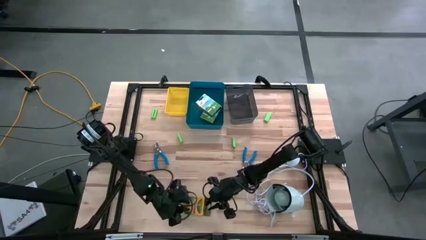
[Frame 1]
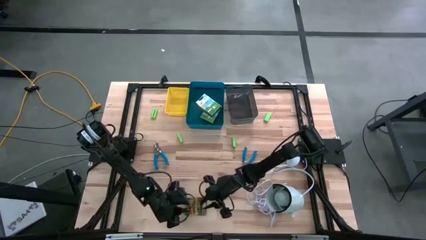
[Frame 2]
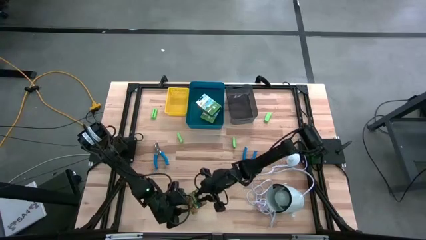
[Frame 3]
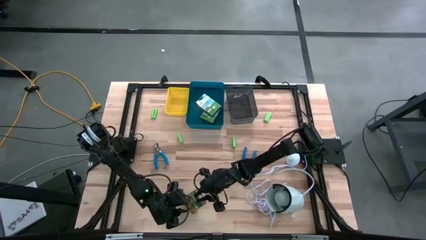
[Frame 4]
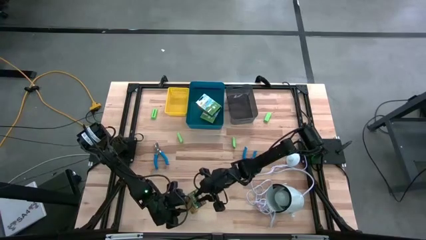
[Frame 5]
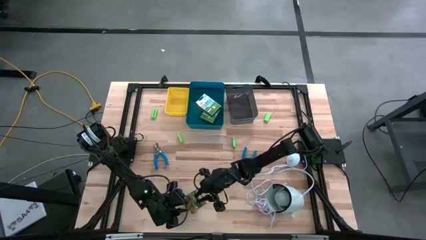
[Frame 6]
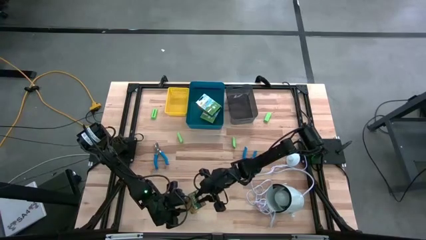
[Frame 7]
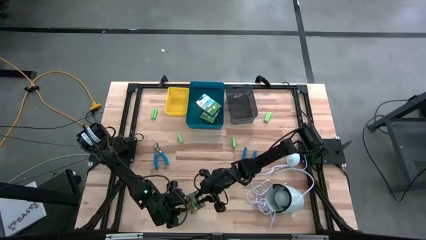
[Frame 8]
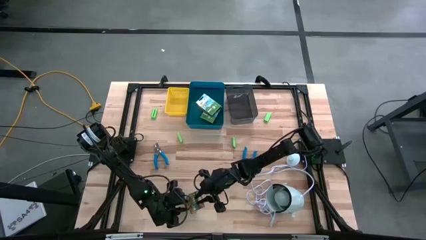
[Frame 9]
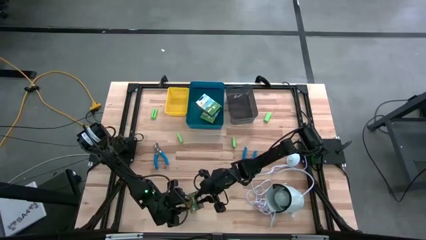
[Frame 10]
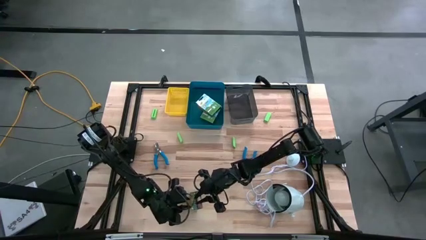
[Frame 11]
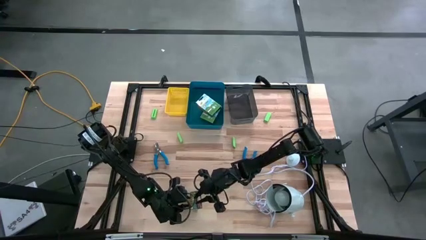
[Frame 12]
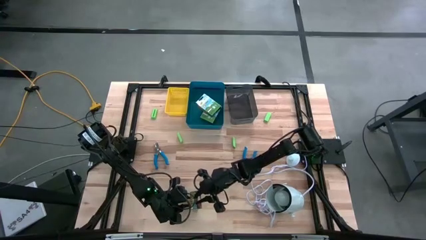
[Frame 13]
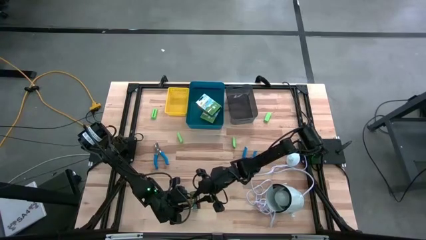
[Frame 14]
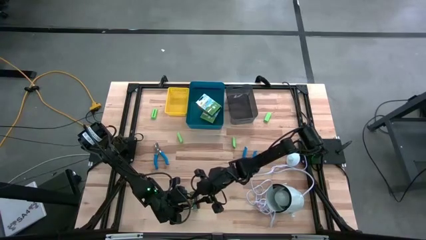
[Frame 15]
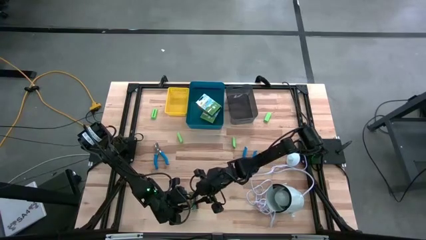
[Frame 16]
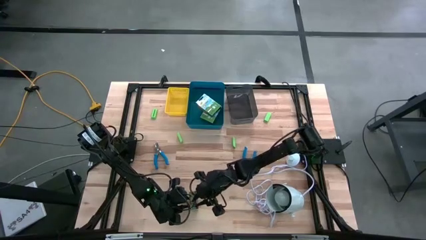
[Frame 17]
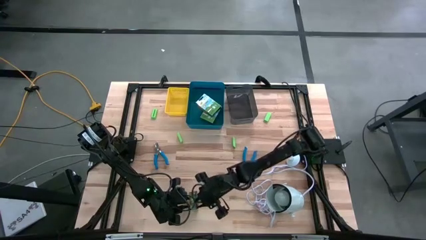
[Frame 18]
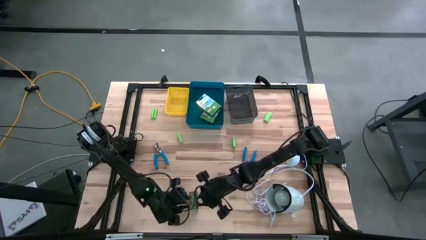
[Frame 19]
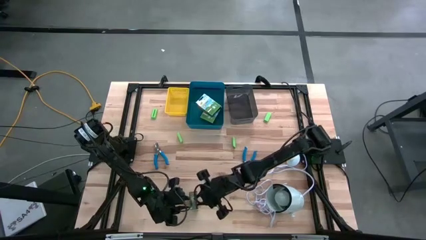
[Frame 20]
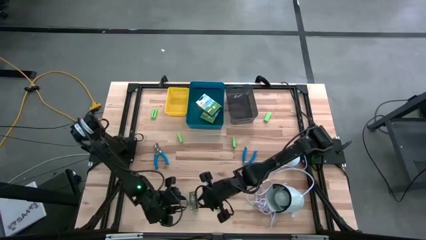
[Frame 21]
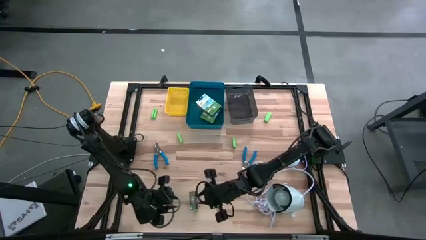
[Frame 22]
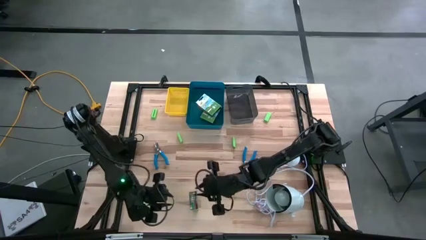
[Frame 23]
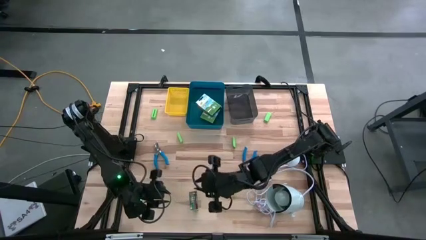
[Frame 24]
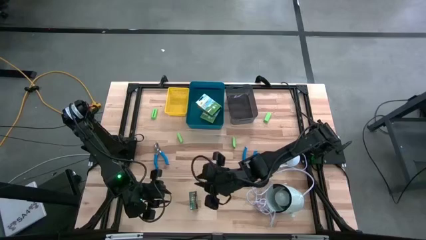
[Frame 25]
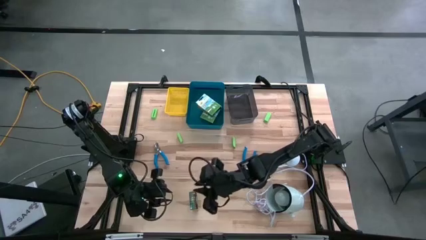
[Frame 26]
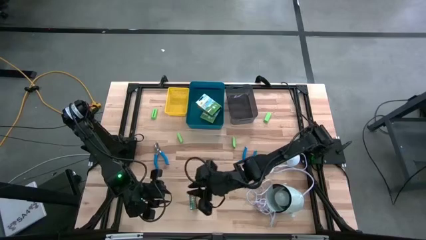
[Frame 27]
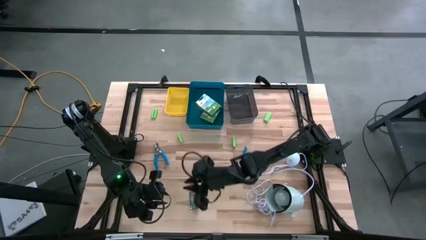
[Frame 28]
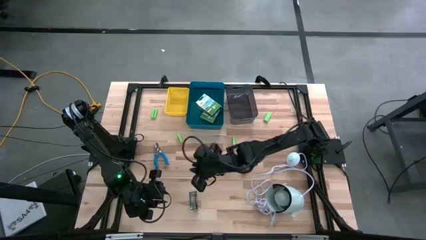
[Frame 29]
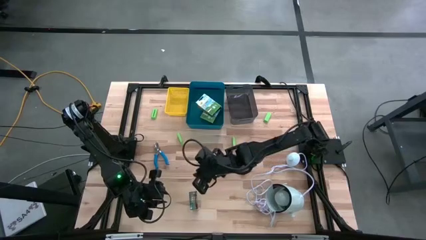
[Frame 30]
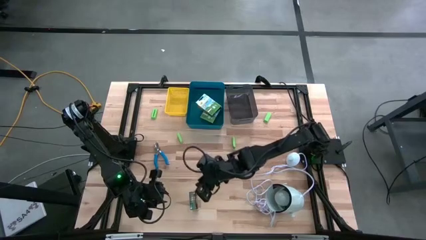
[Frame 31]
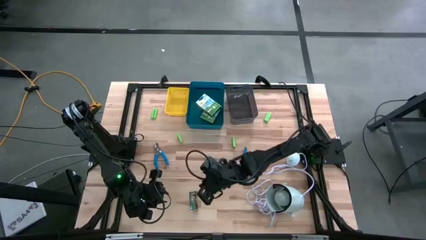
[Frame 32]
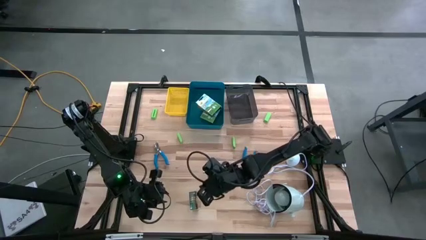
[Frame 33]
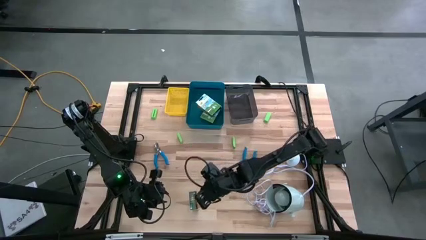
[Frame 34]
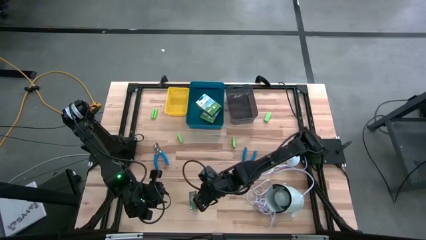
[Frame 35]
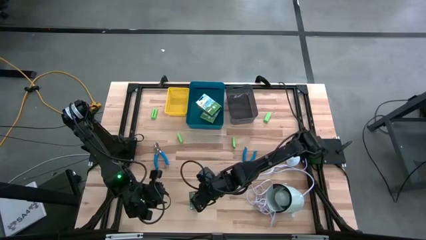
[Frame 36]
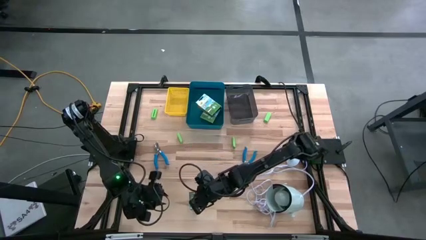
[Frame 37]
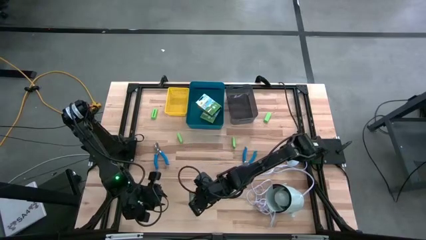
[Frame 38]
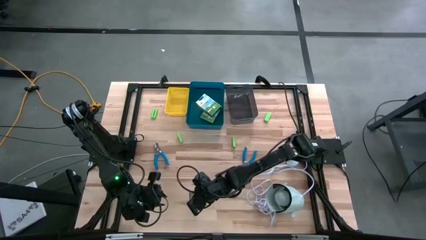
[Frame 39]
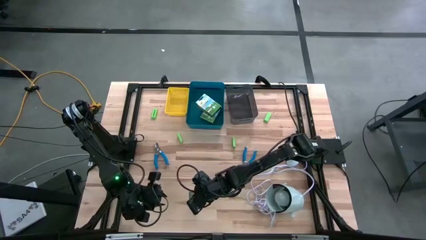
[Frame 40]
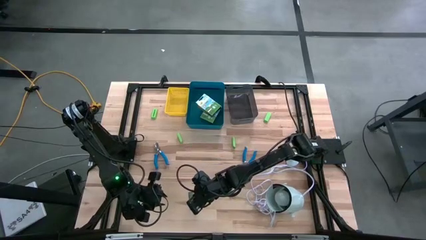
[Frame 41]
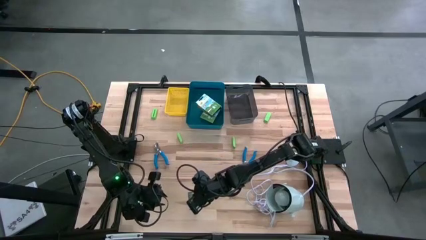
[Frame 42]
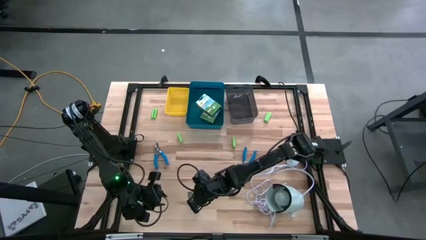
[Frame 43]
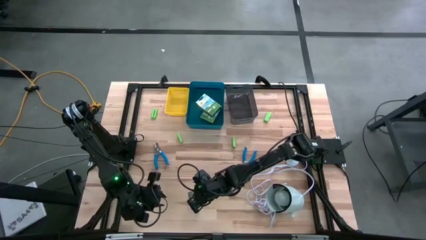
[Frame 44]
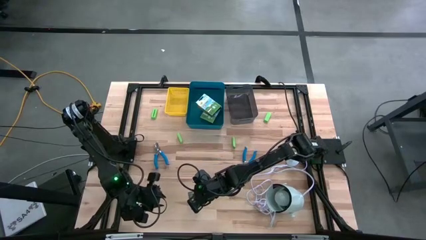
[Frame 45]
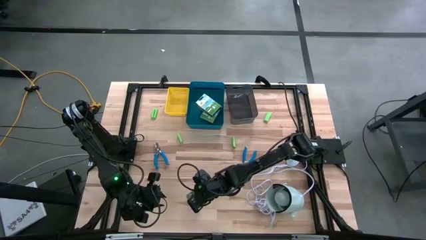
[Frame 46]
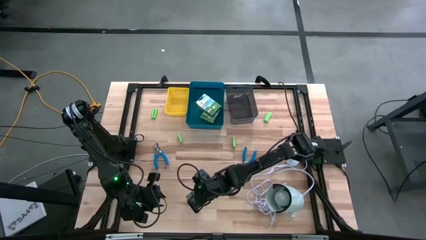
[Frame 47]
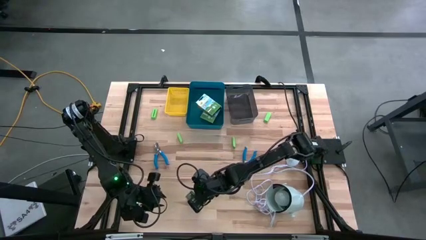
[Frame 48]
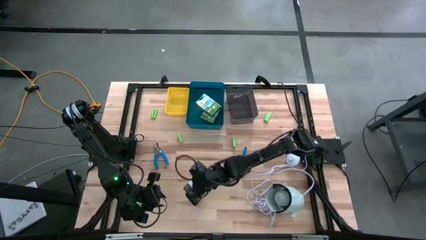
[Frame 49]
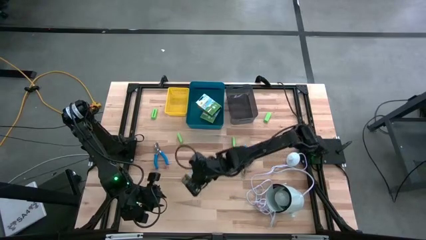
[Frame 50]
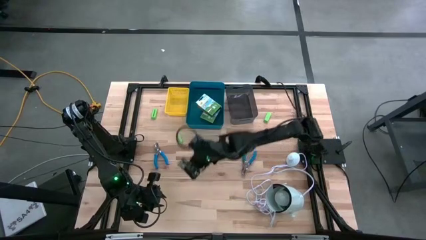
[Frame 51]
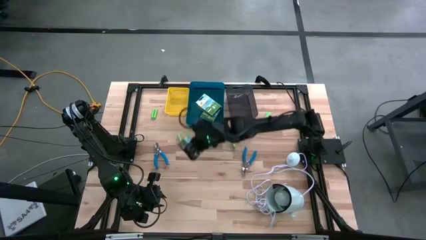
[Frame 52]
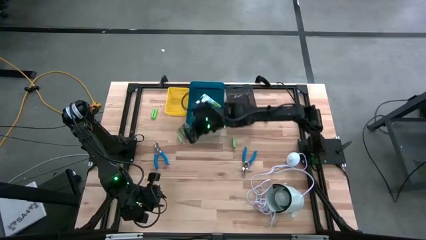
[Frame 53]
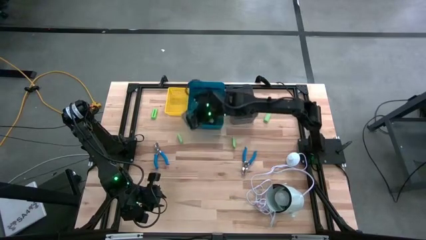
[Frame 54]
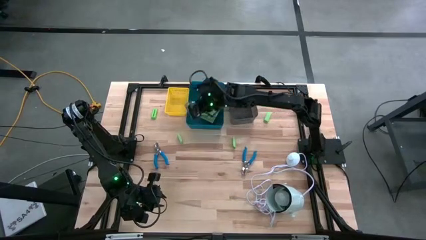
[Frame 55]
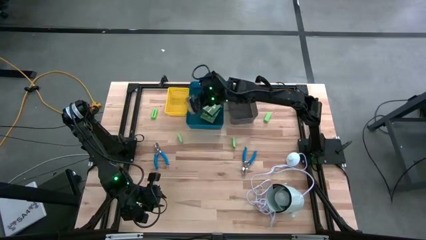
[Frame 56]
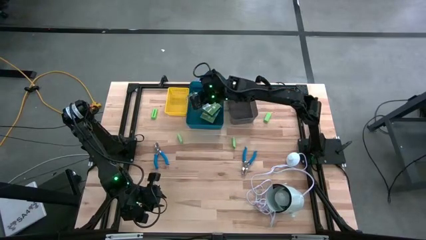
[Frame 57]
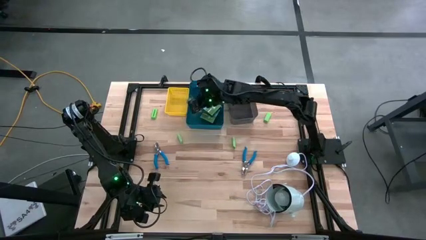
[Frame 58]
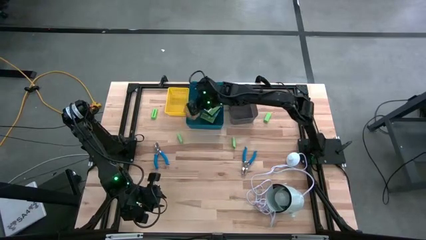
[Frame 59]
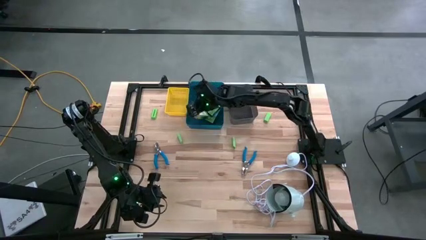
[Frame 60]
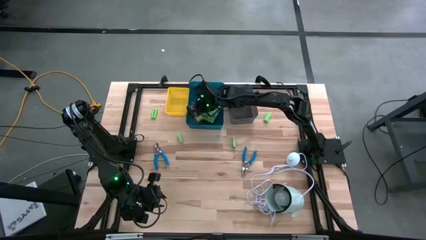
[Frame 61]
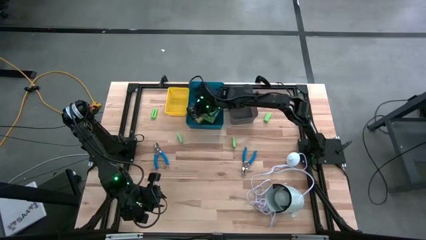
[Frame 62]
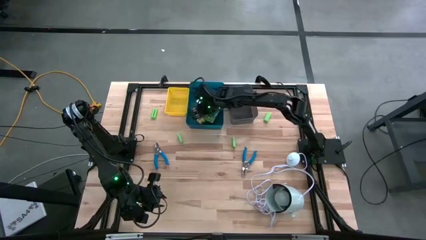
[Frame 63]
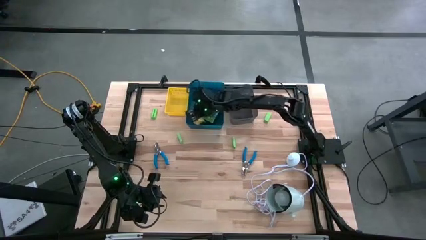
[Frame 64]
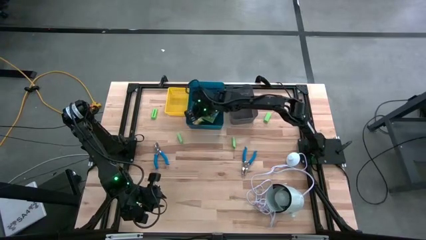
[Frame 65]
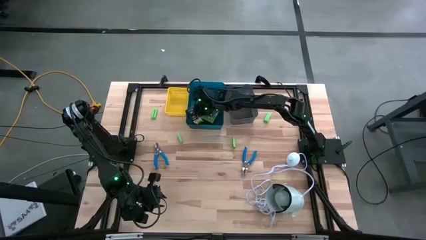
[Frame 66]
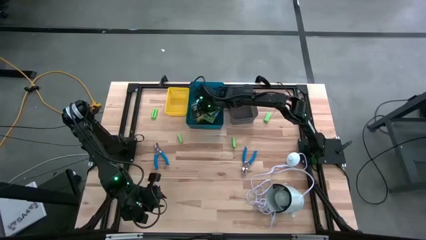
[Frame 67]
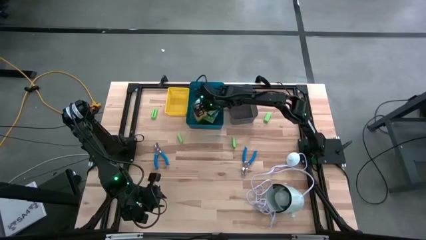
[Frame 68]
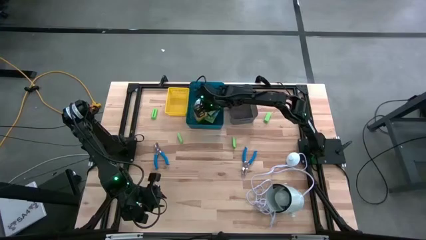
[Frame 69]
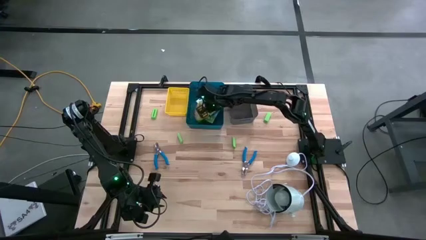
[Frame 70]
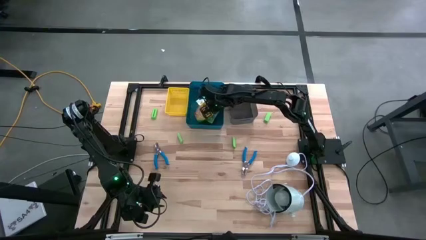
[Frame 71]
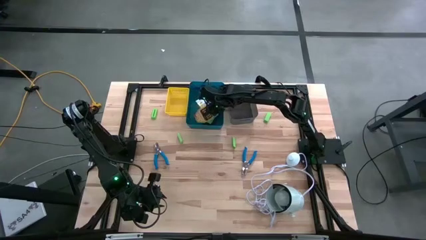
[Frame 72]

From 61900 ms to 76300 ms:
Task: Pick & Place School Supplies
Put the crayon box into the blue bin
